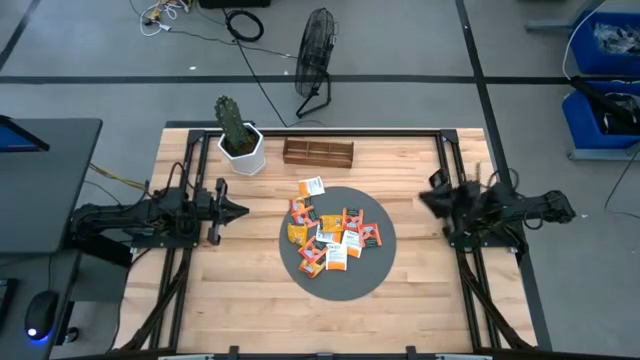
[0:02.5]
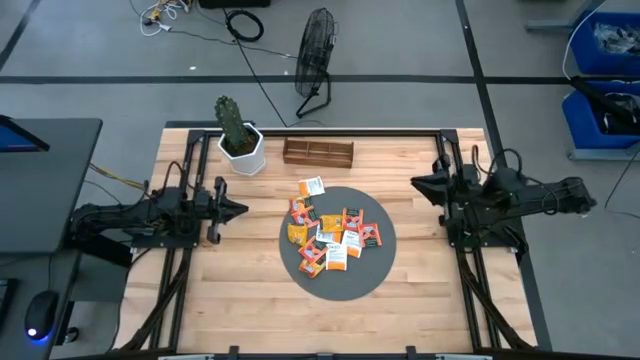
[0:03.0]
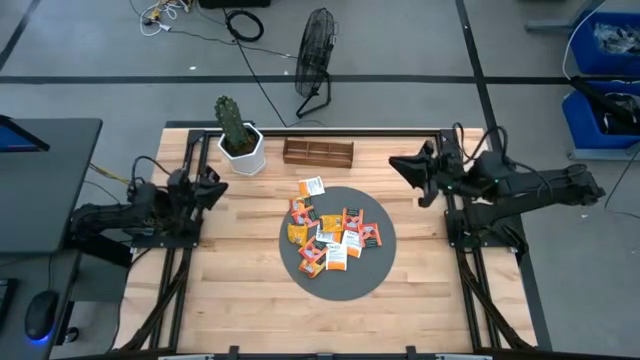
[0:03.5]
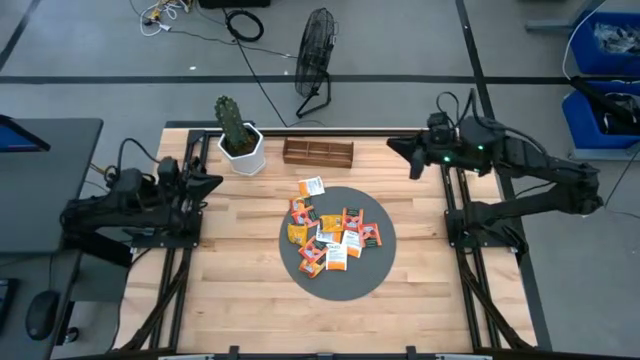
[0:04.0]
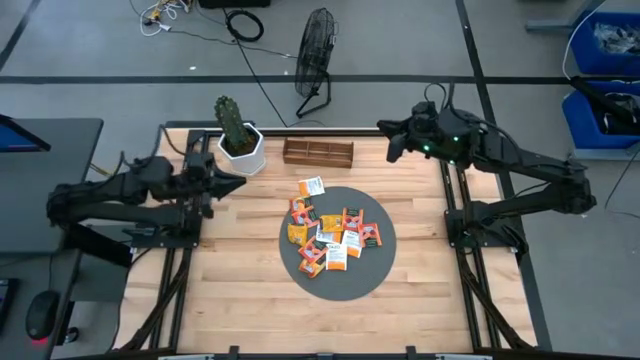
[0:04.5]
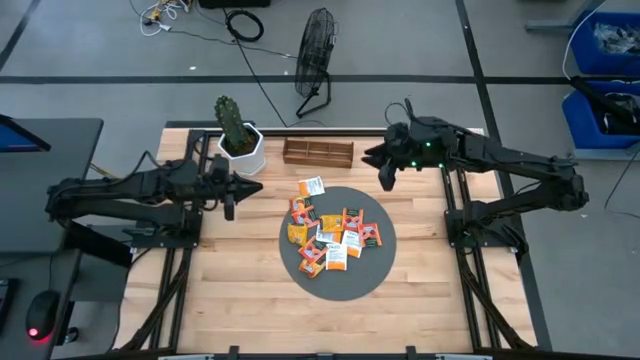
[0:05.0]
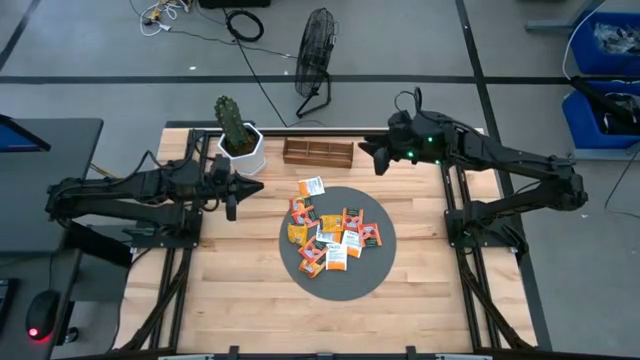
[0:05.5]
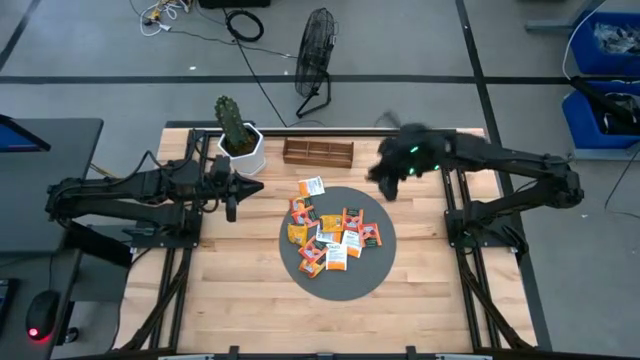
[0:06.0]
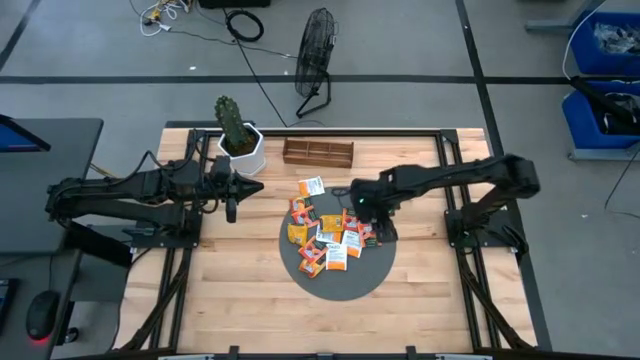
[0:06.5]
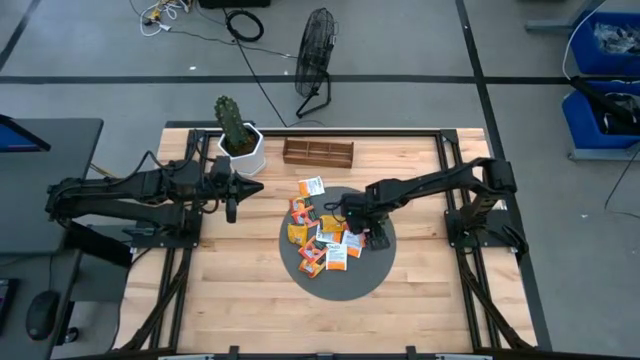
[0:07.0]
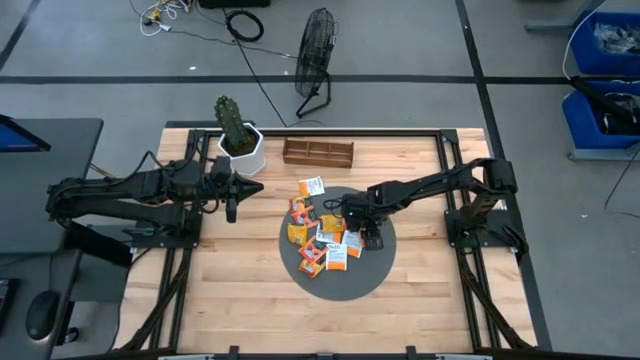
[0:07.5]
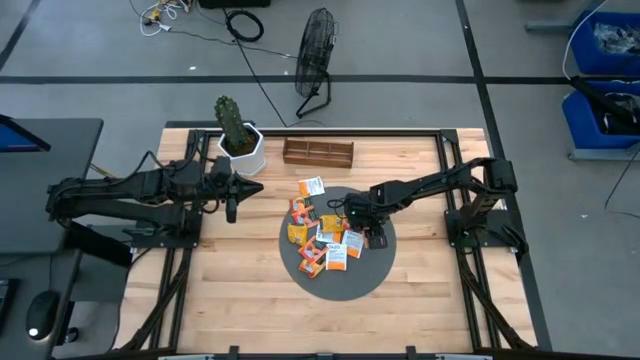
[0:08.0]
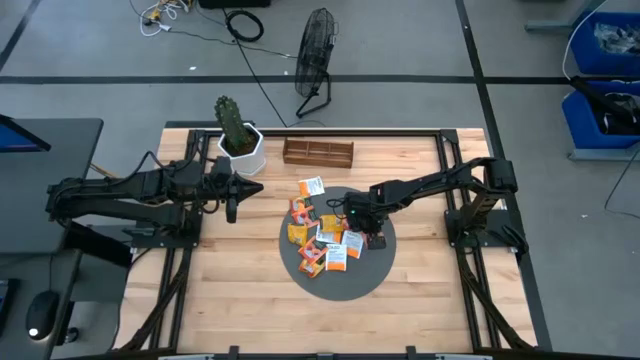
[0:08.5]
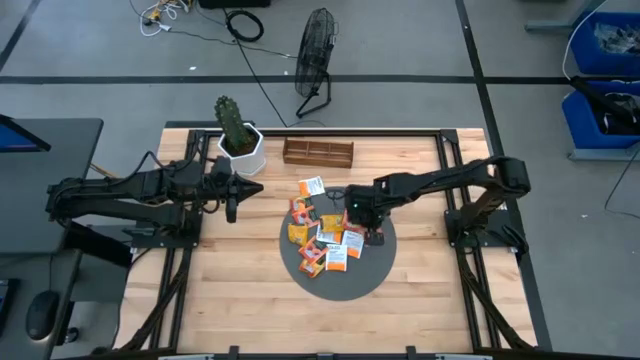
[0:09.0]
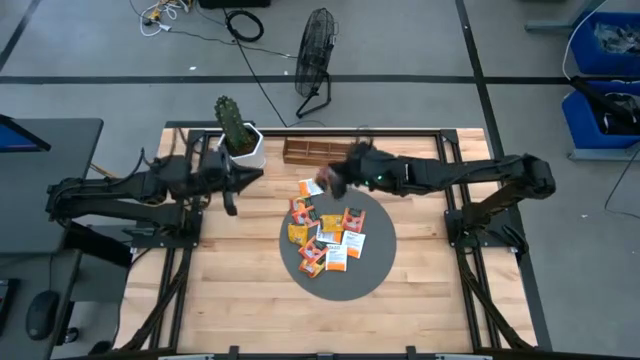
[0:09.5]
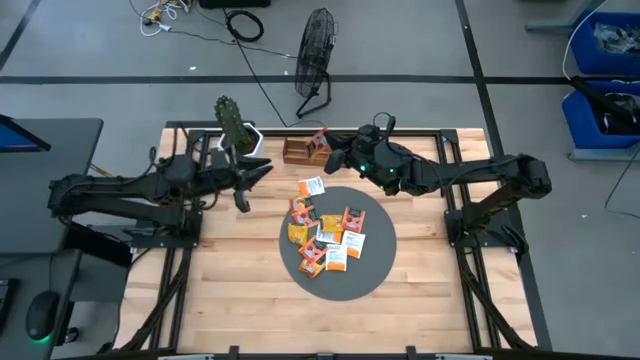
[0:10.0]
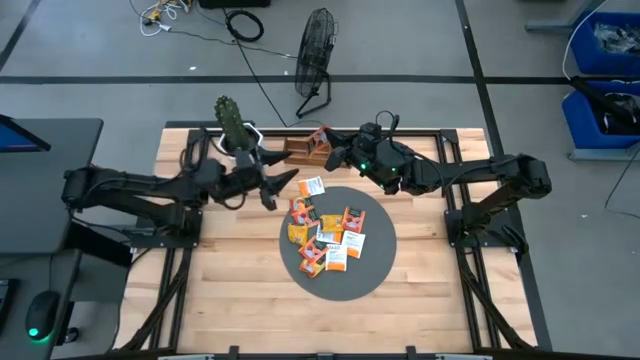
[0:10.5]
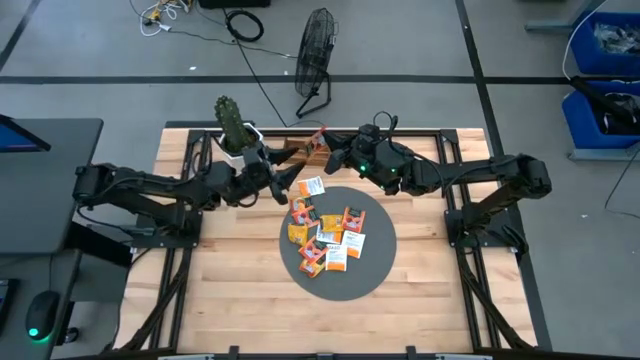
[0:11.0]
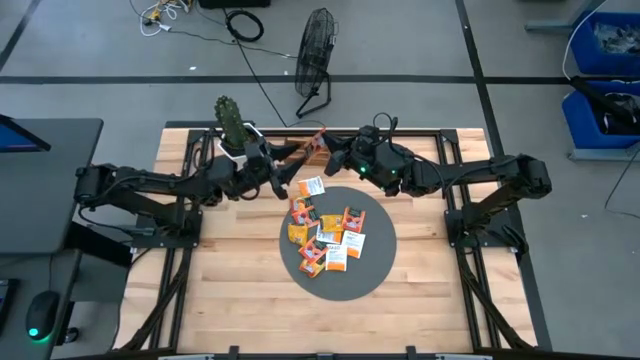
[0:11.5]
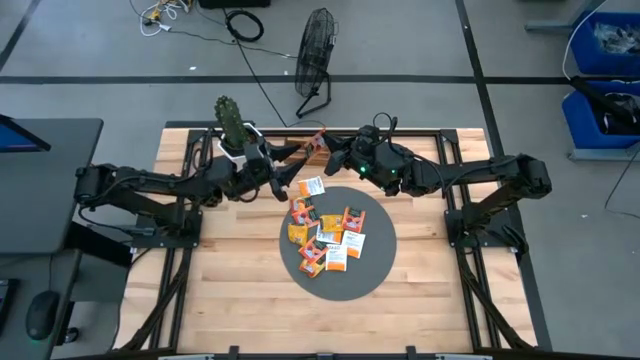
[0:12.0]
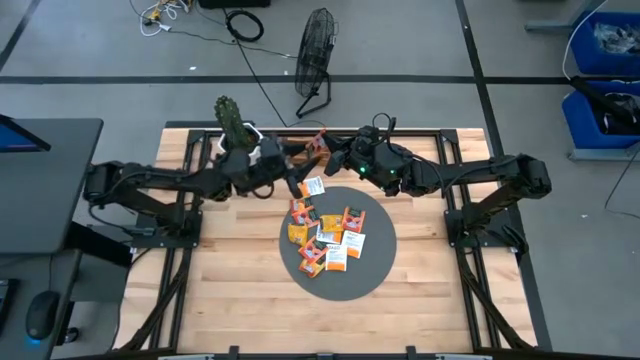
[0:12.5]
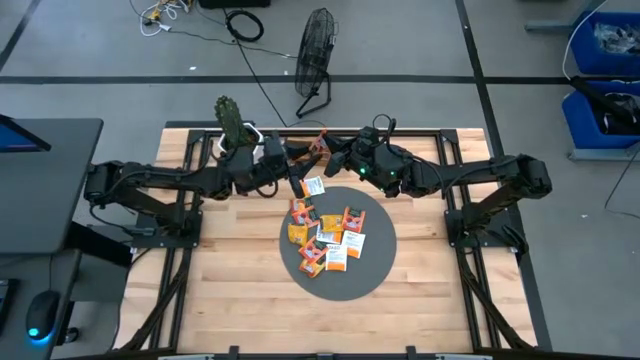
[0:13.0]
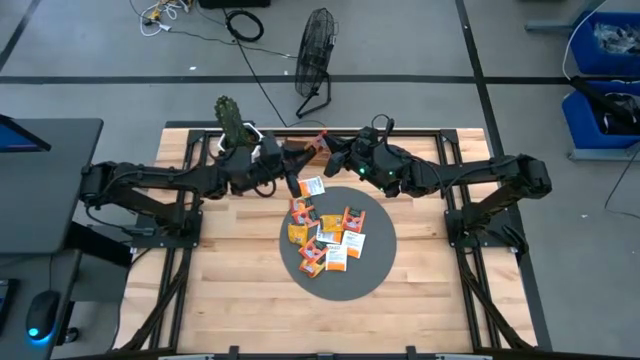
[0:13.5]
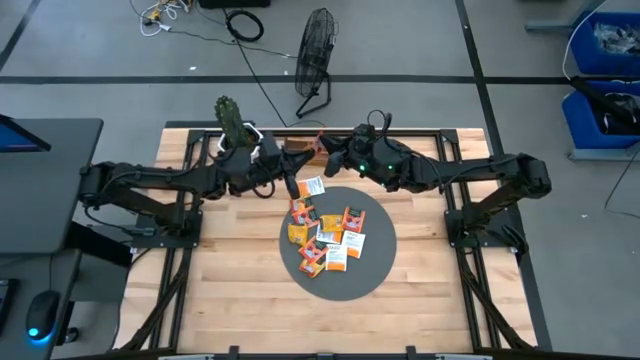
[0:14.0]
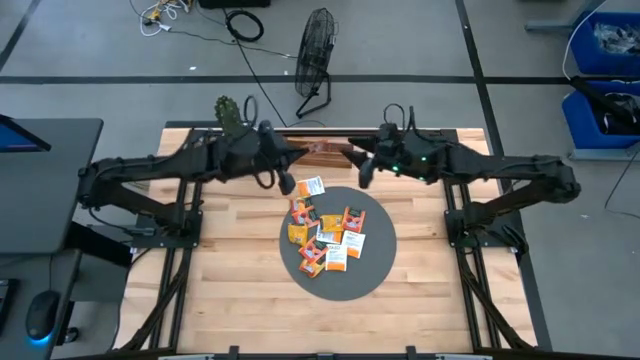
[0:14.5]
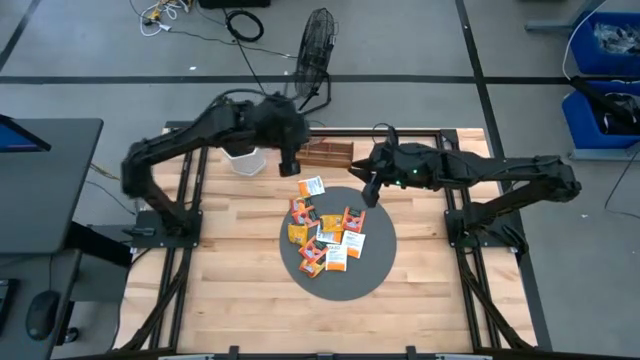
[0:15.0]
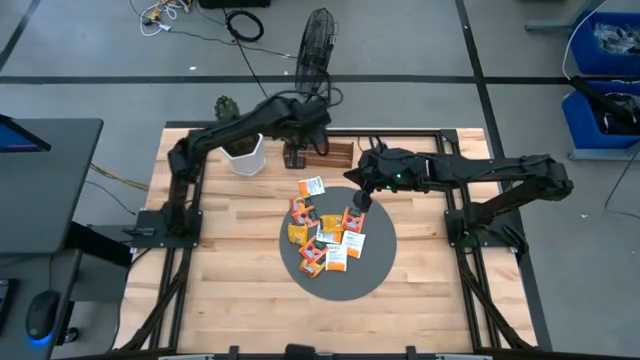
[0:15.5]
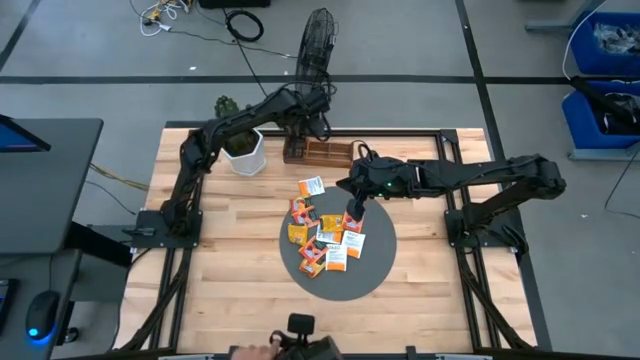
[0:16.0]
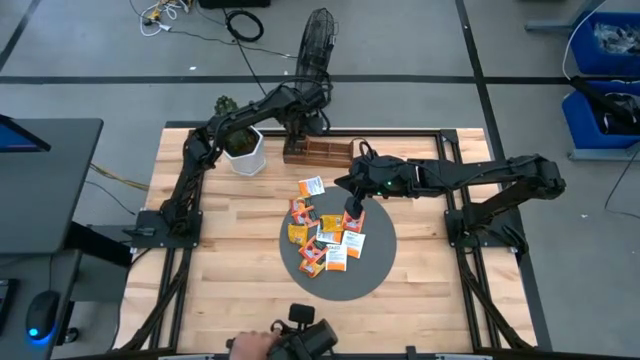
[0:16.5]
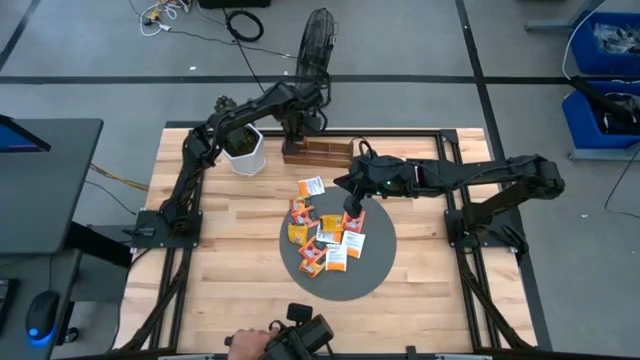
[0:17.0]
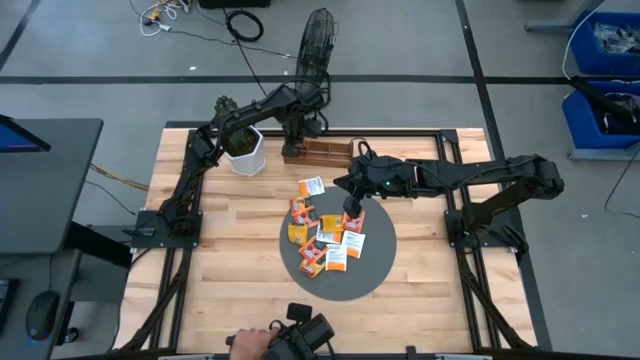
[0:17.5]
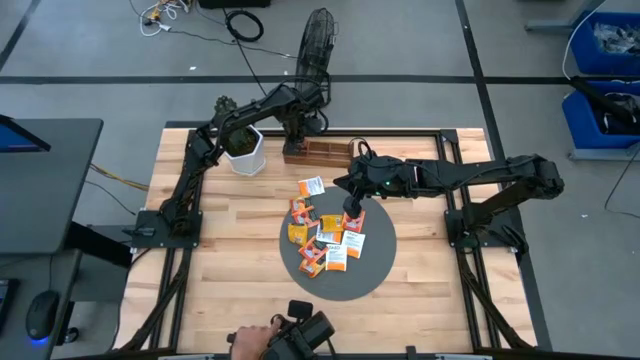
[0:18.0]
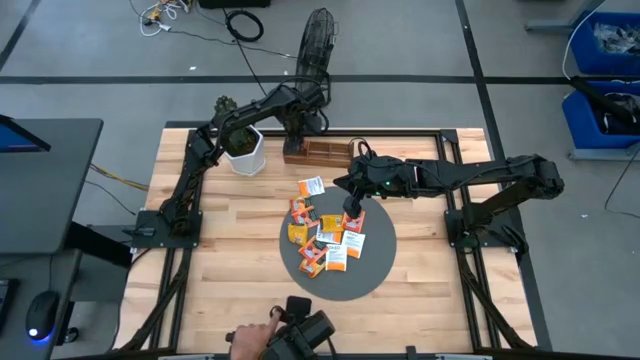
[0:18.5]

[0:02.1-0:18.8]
Task: Pick & Place Tea
Put the orange tea bag into the left section of the wooden organizer
